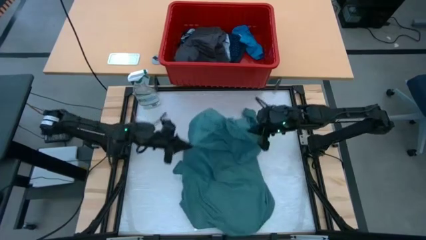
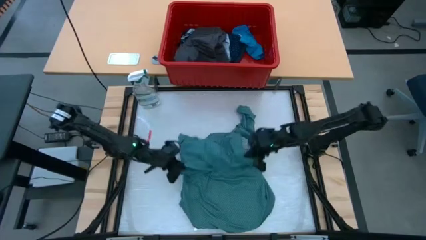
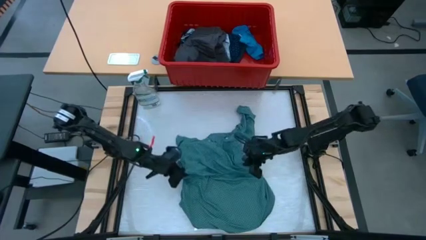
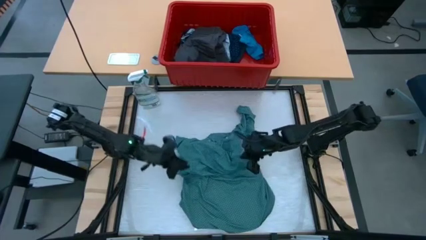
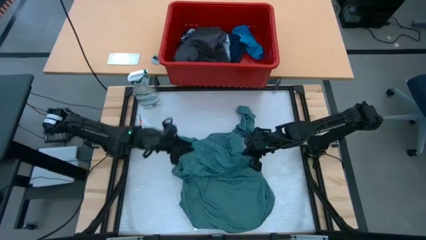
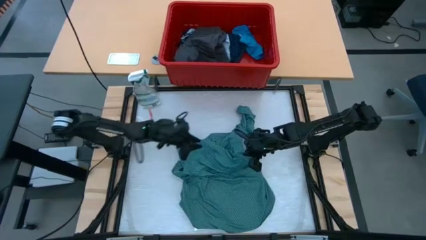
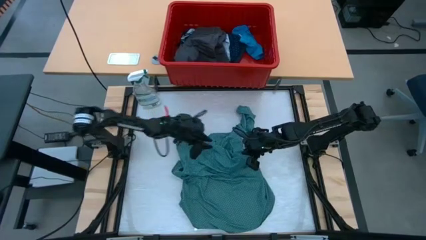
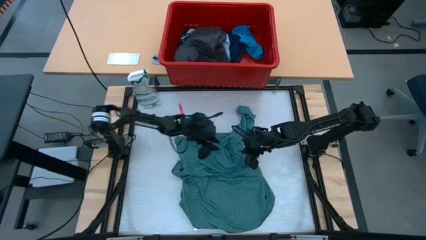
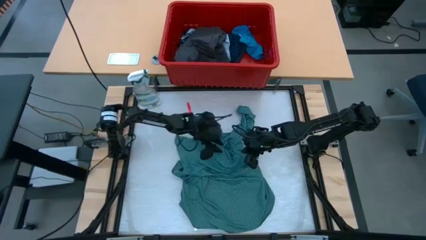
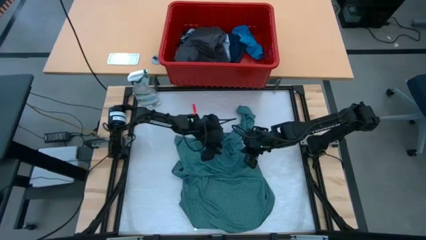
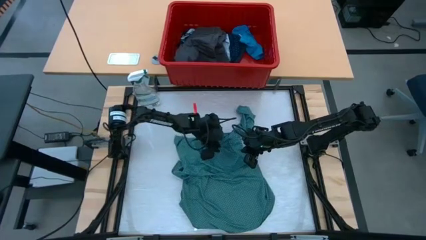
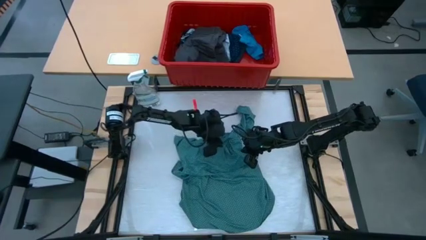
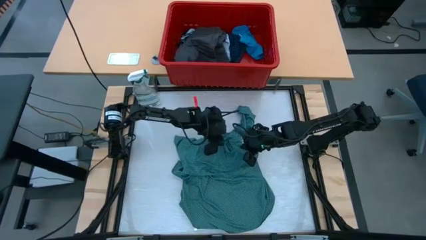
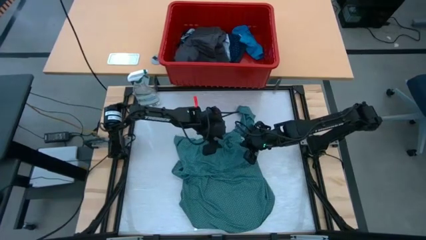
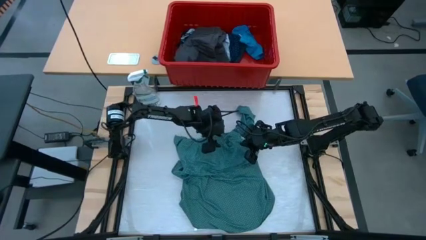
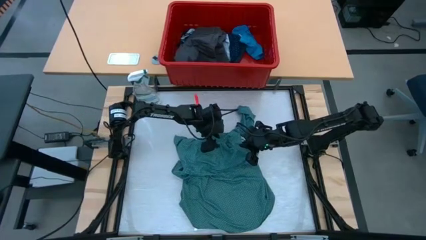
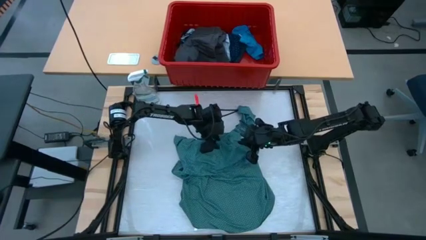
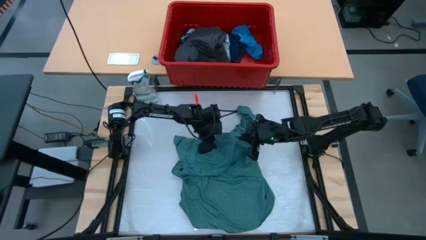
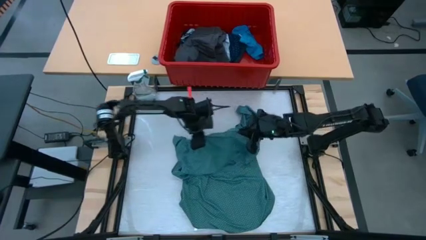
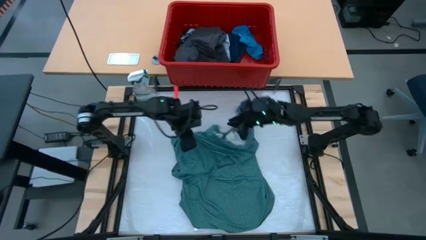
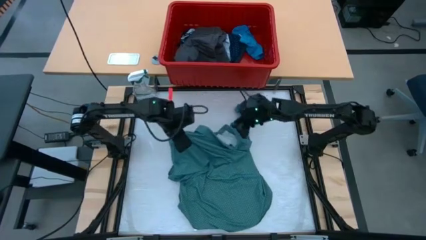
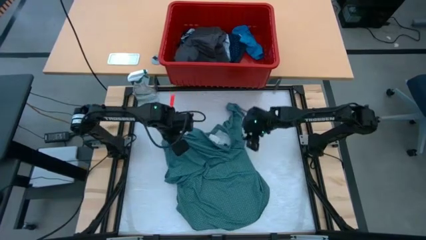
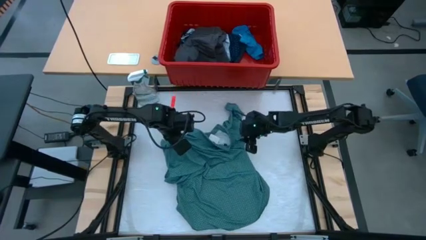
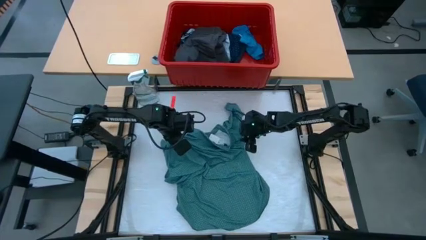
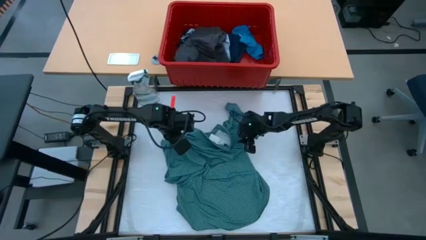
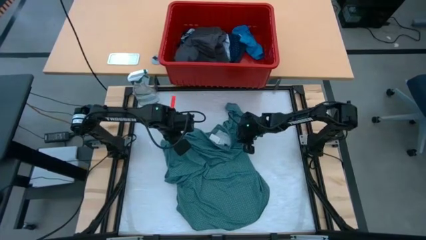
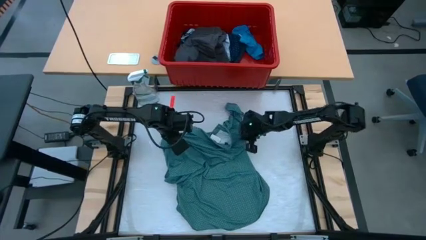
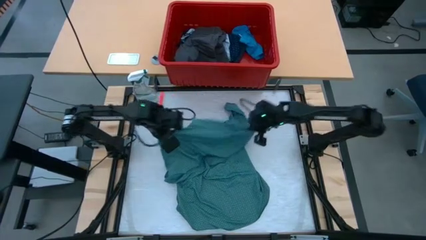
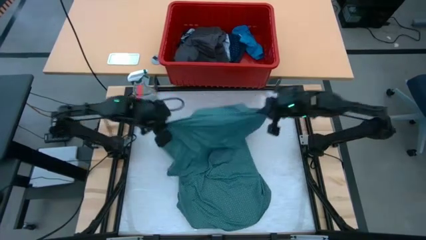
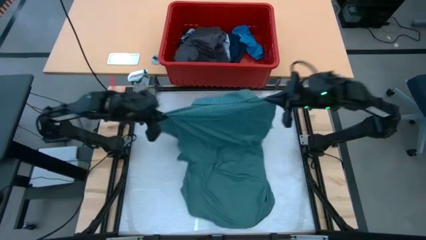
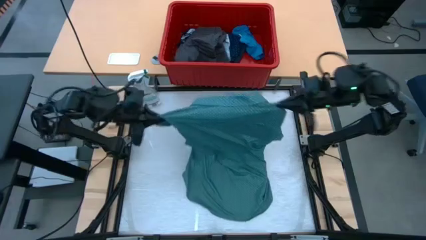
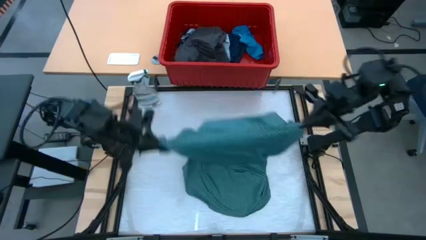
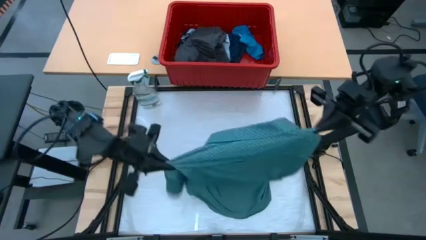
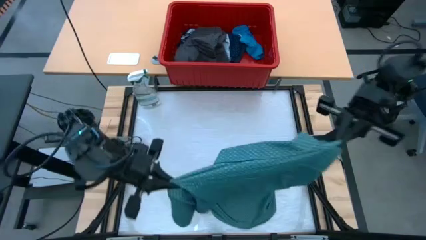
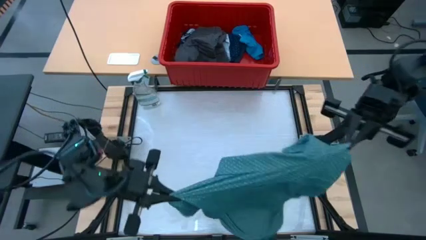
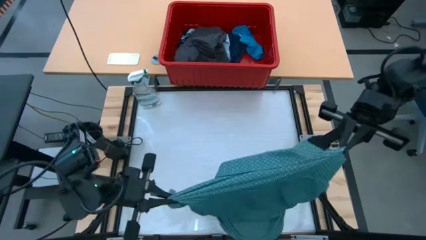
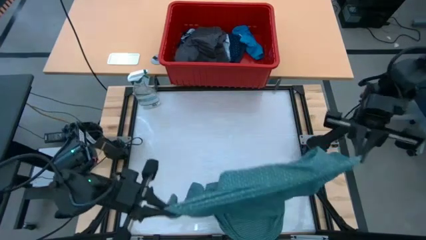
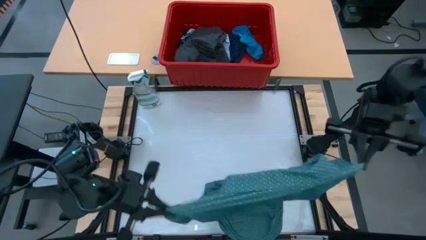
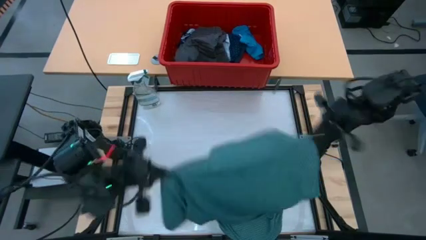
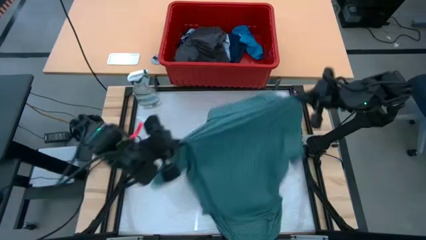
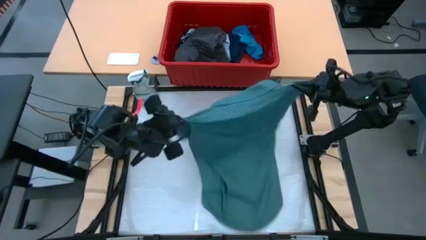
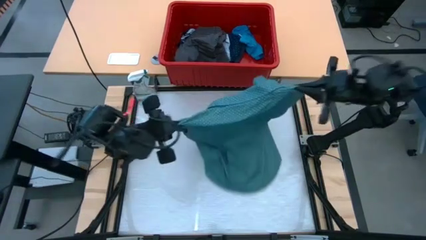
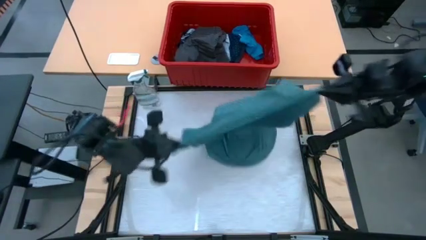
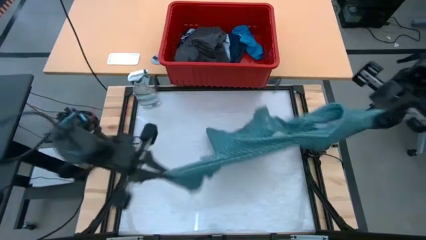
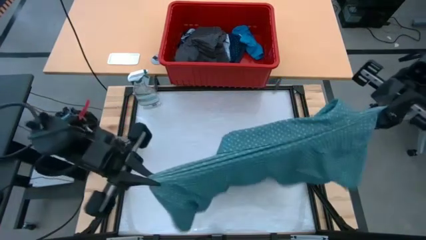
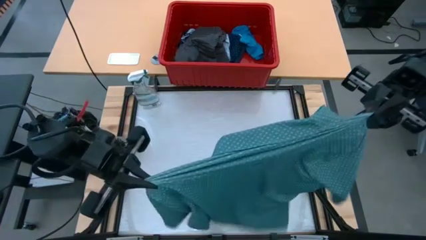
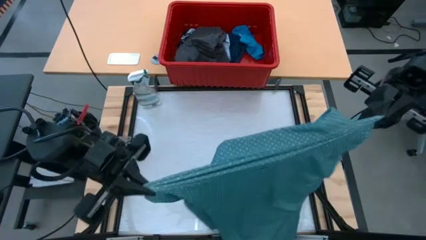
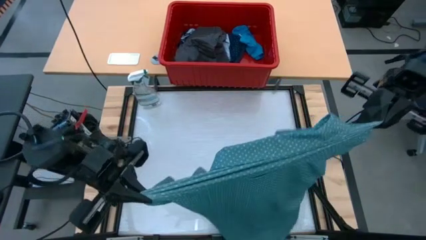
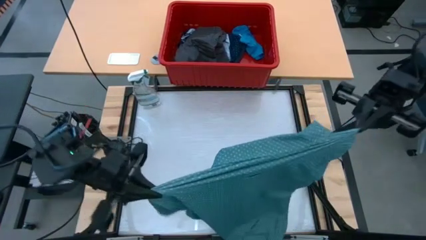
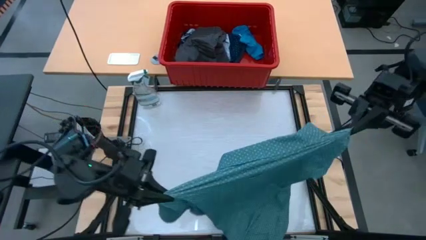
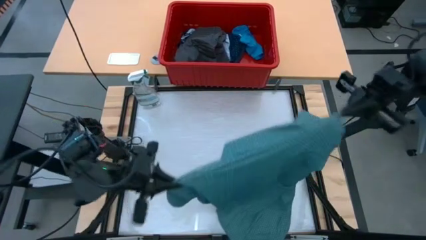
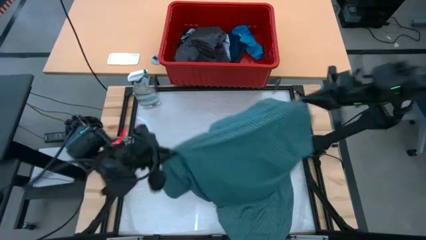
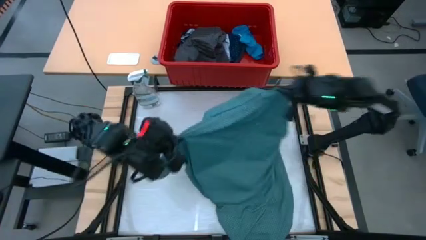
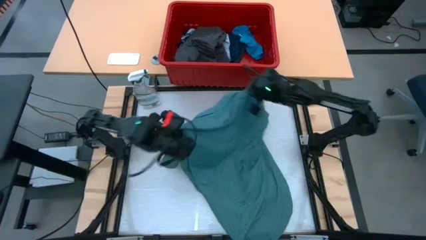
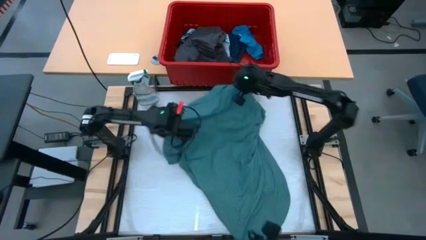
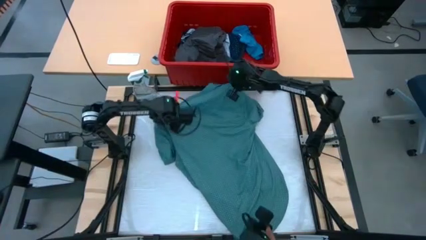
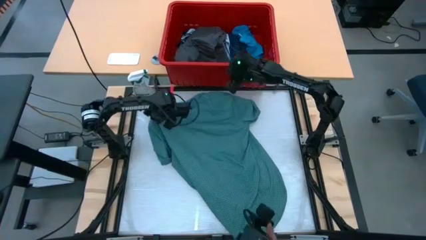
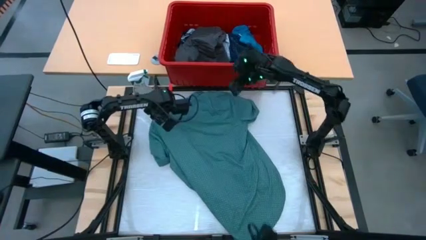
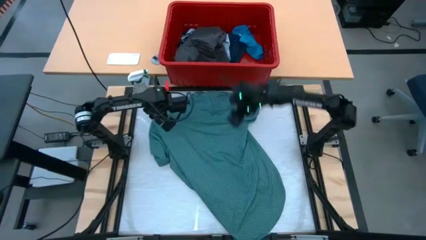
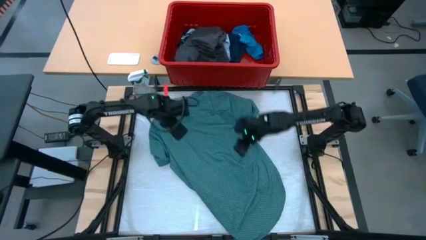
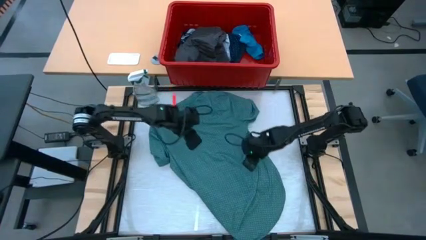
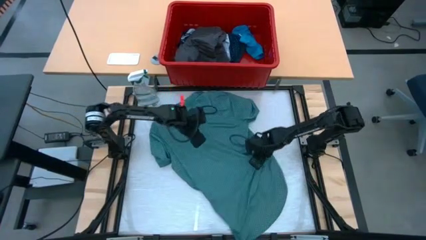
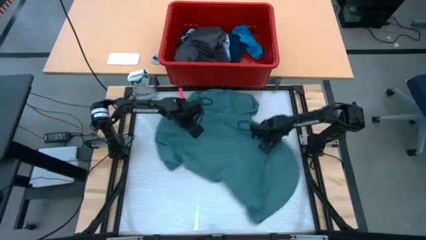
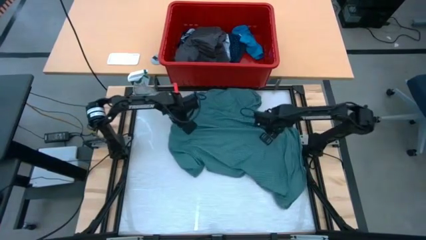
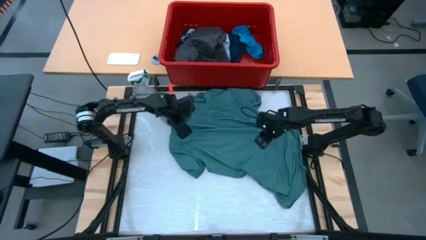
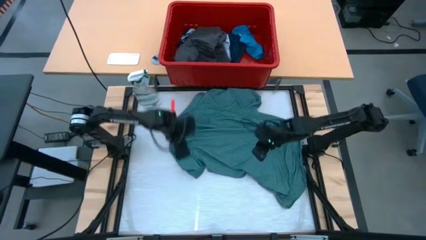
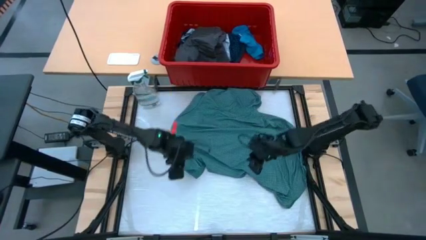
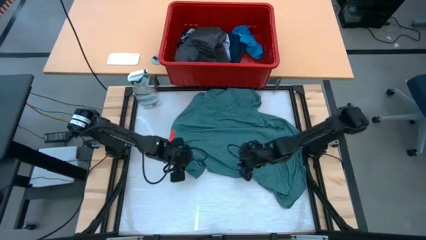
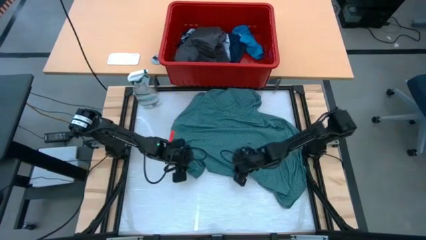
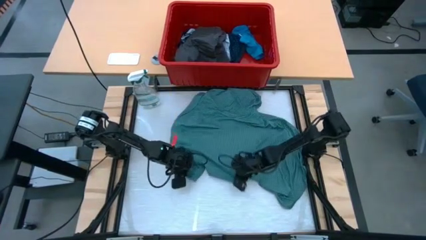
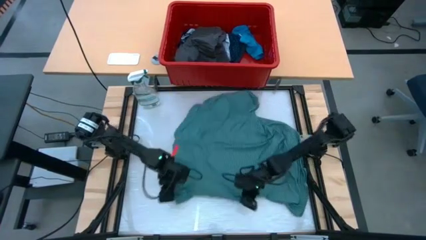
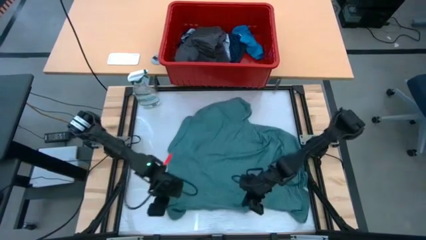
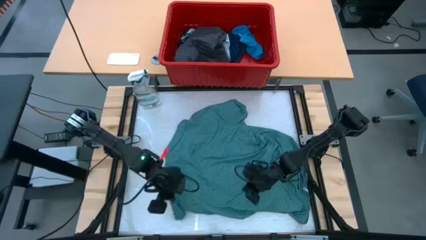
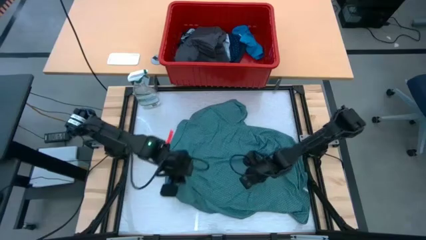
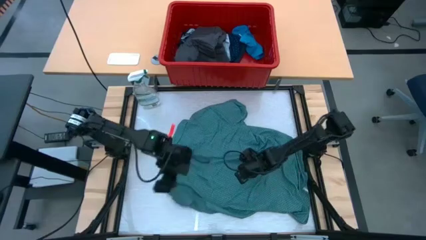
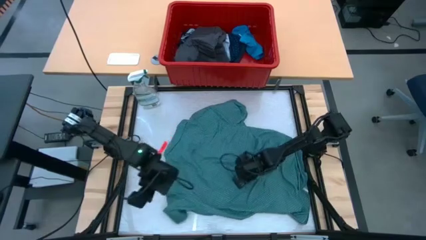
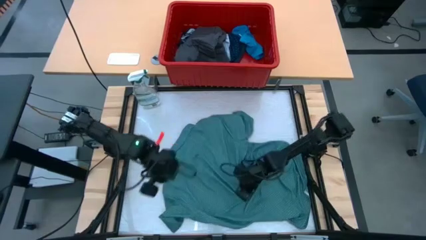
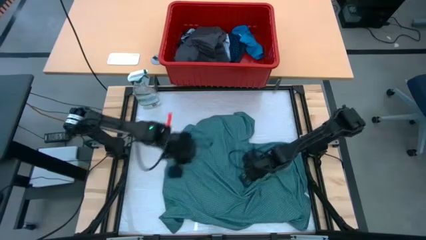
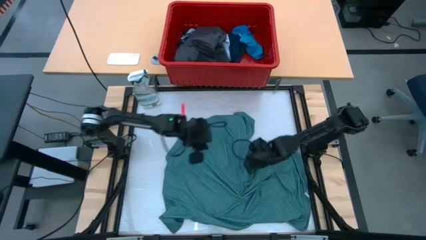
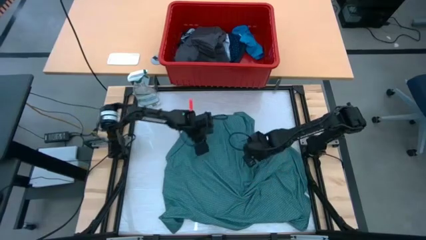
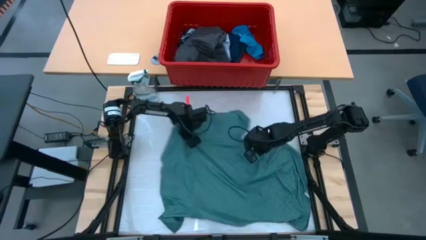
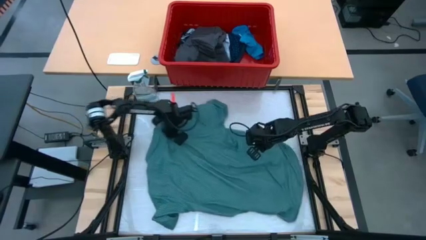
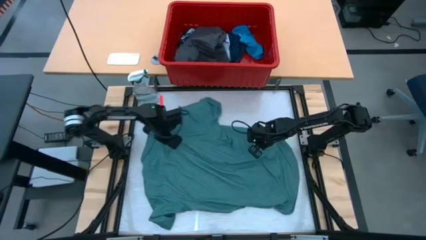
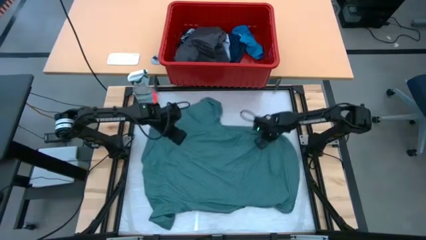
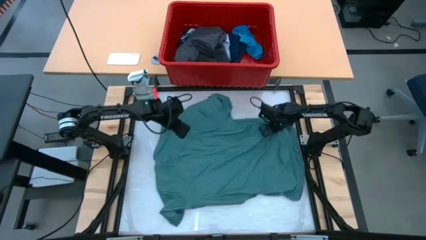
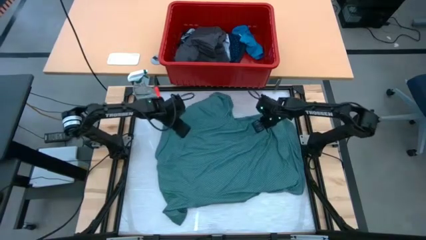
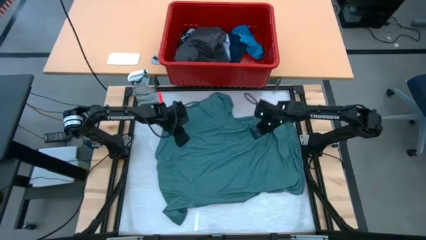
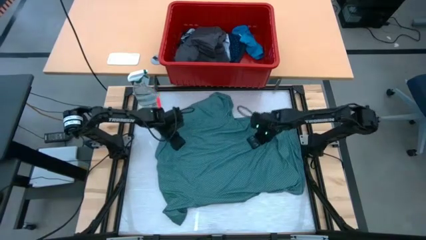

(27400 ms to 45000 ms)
Task: Fold laundry
Fold the green shirt
